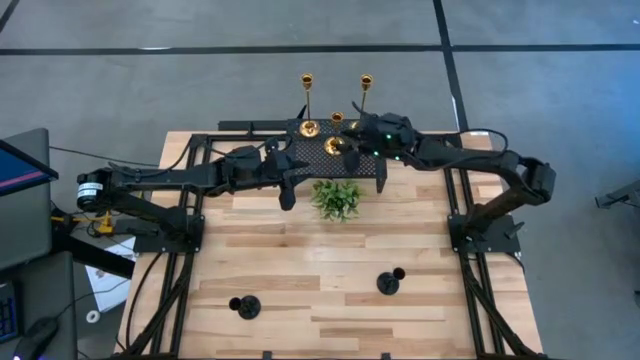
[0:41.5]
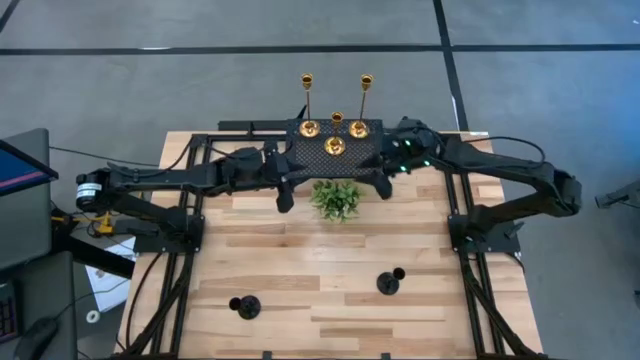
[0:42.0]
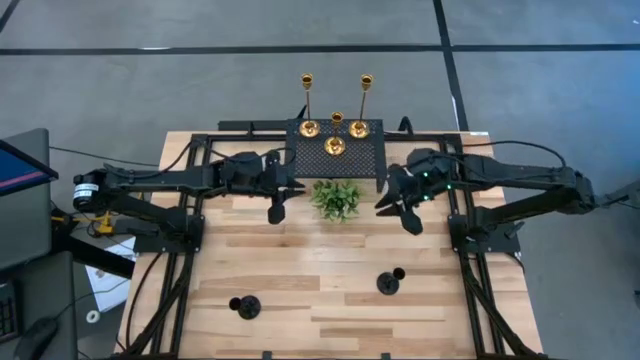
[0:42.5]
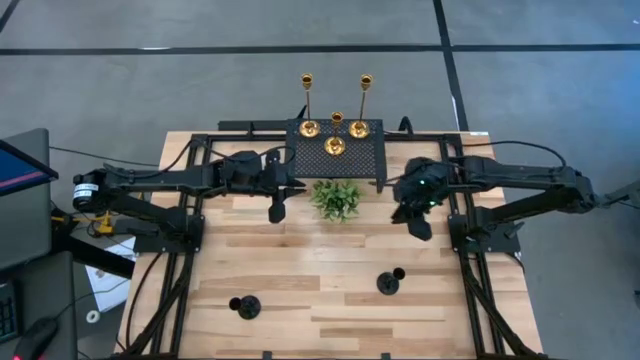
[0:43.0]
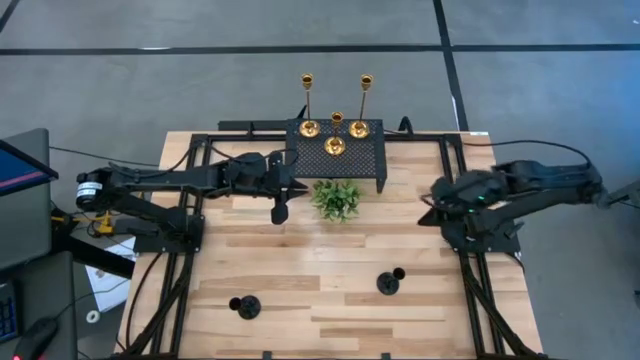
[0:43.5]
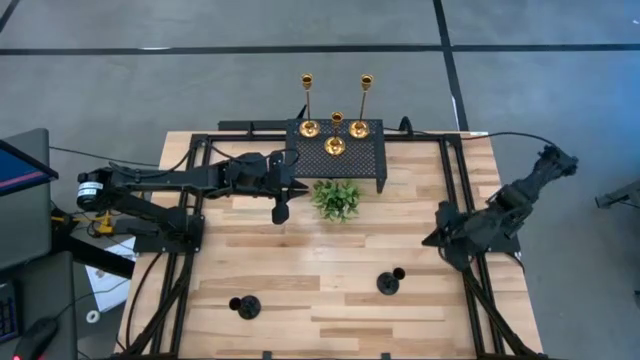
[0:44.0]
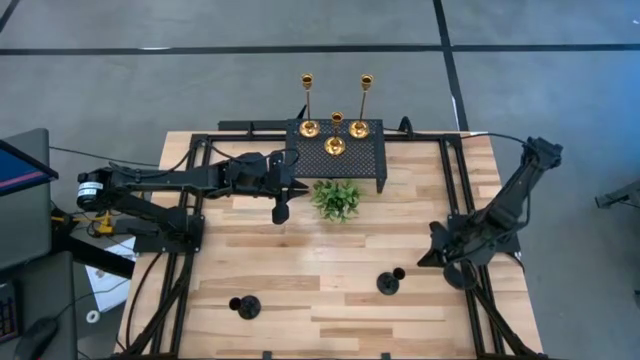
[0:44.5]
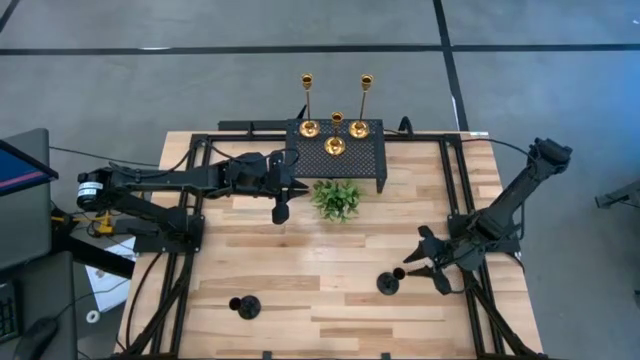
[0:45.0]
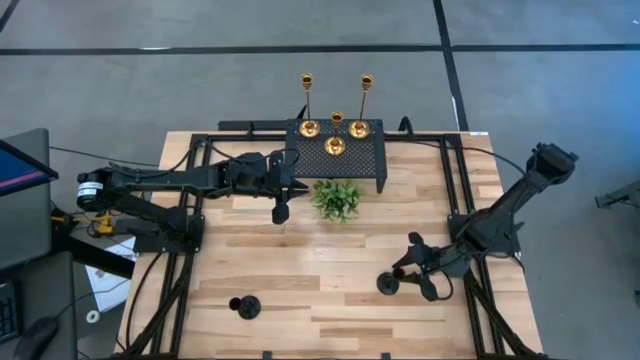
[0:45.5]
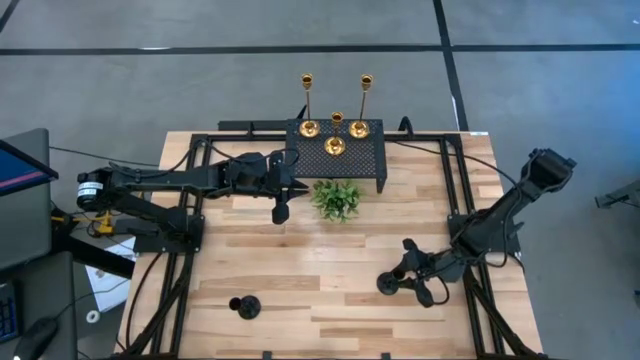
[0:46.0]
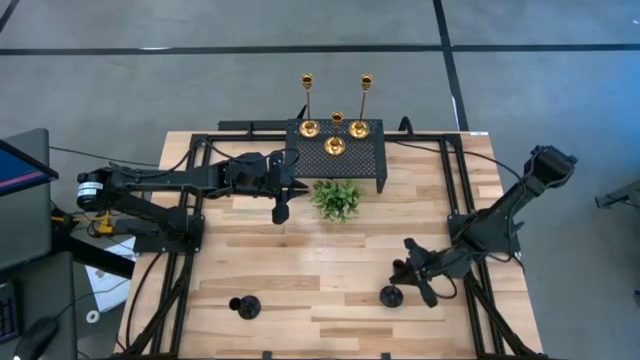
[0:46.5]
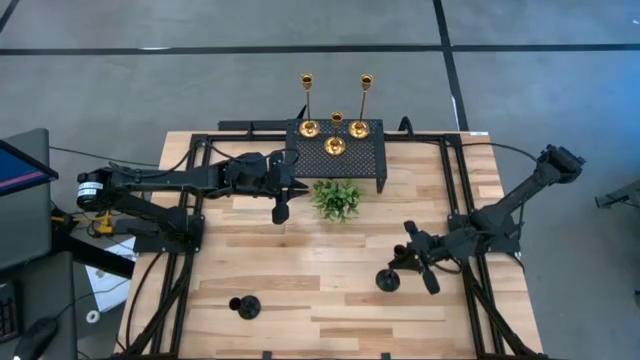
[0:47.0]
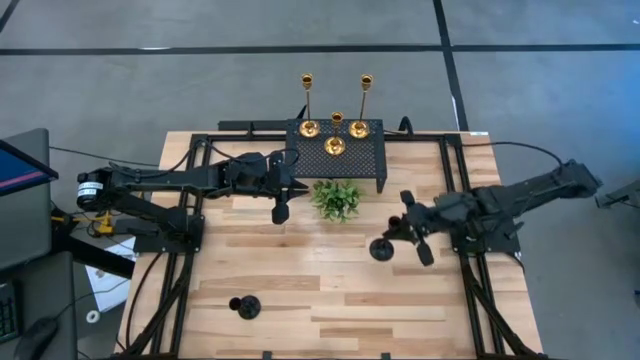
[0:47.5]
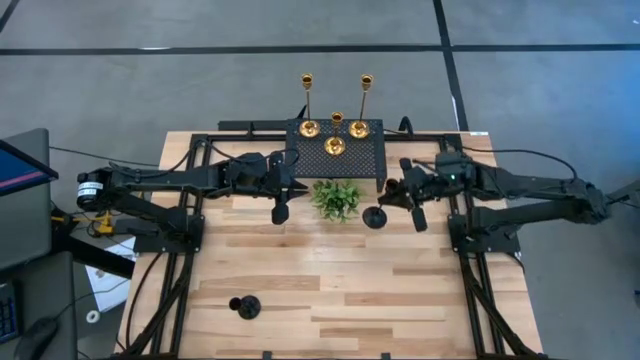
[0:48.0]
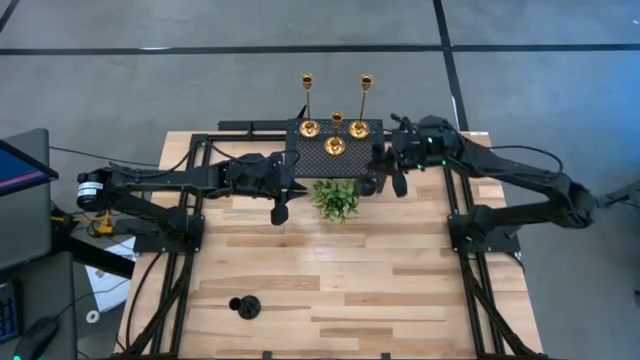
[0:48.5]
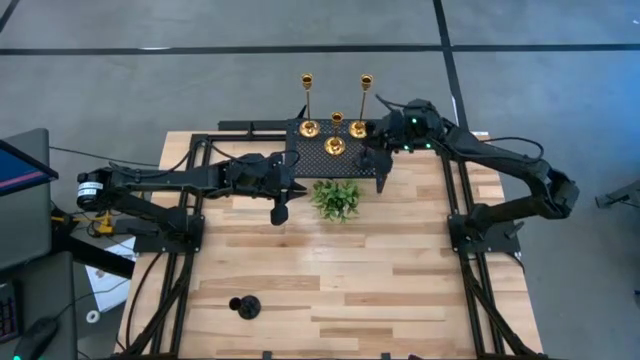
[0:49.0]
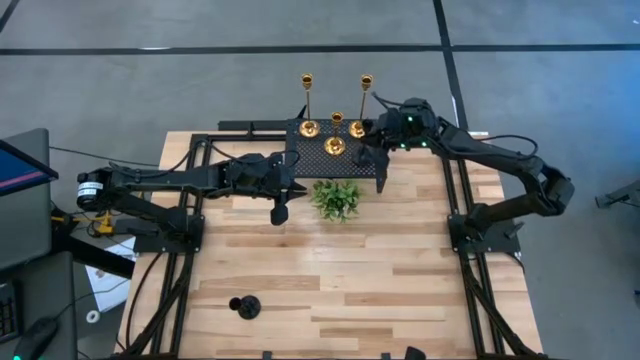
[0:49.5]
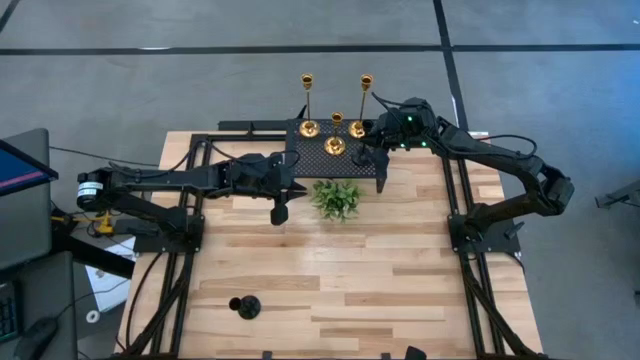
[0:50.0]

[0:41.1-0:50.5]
Task: Pick & Place candle stick holders
Put the right black candle holder on the shelf

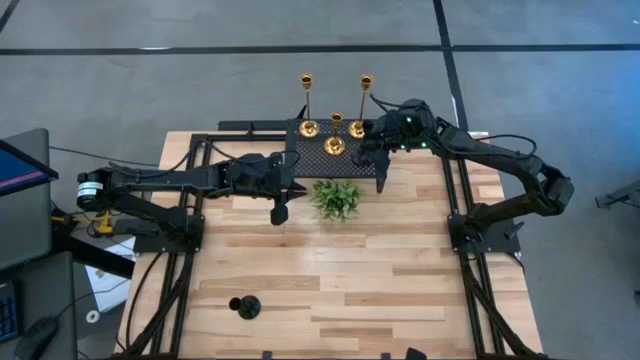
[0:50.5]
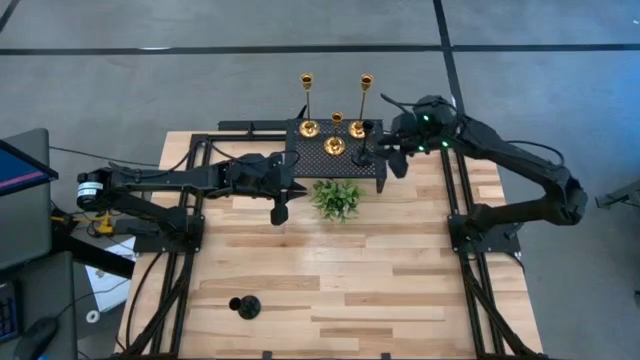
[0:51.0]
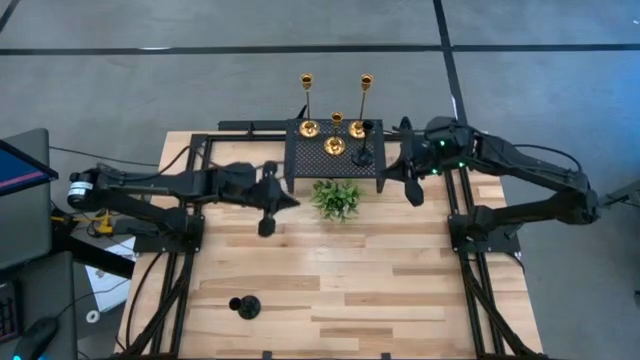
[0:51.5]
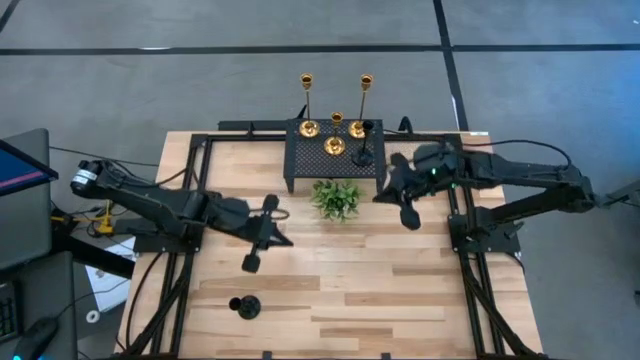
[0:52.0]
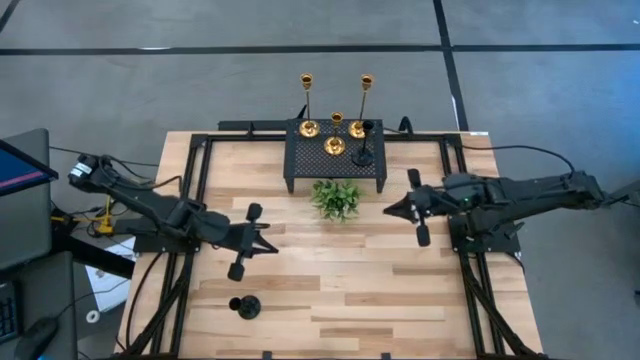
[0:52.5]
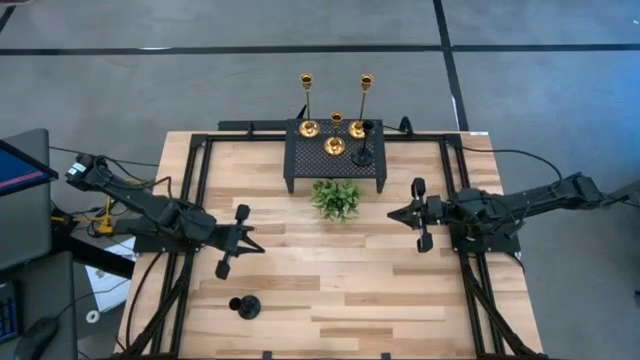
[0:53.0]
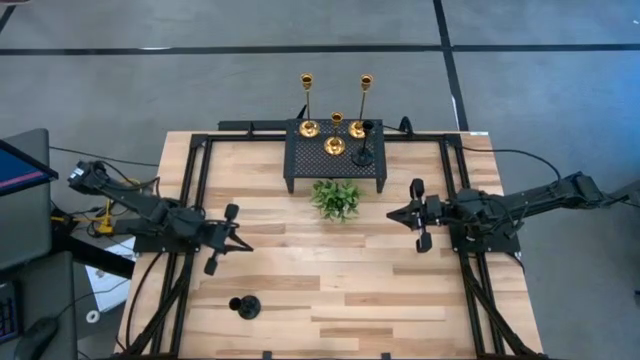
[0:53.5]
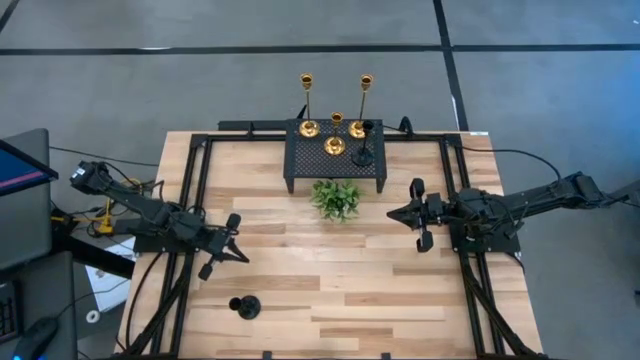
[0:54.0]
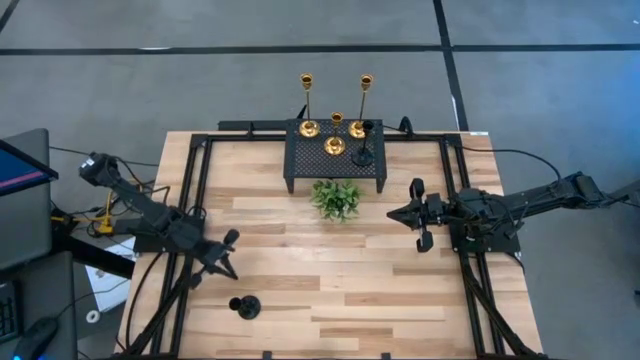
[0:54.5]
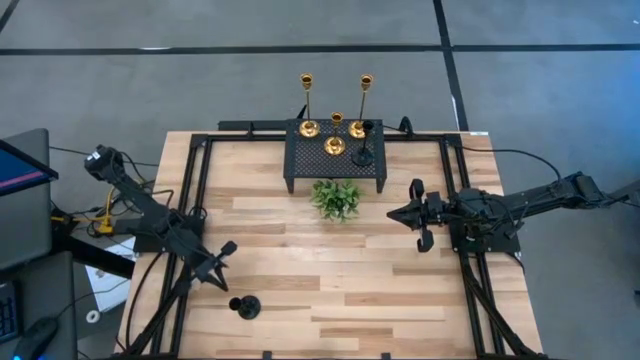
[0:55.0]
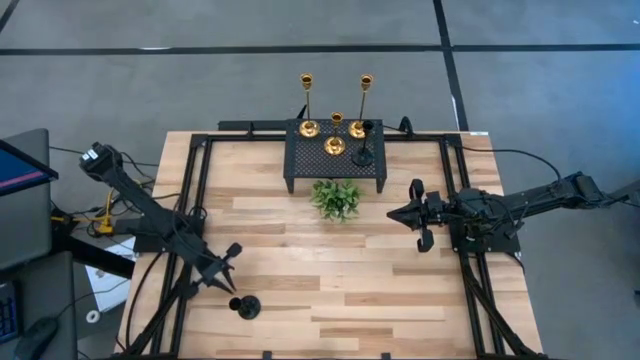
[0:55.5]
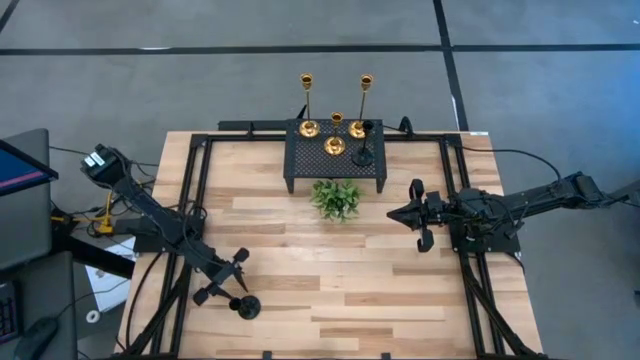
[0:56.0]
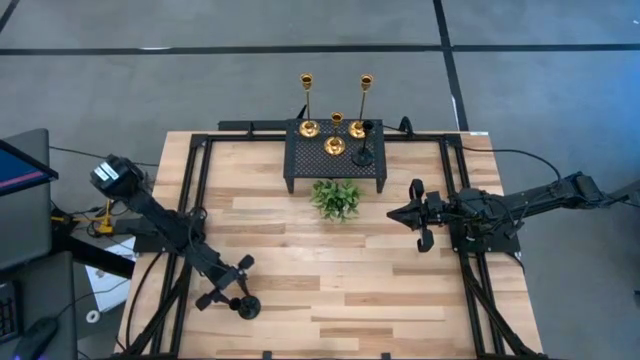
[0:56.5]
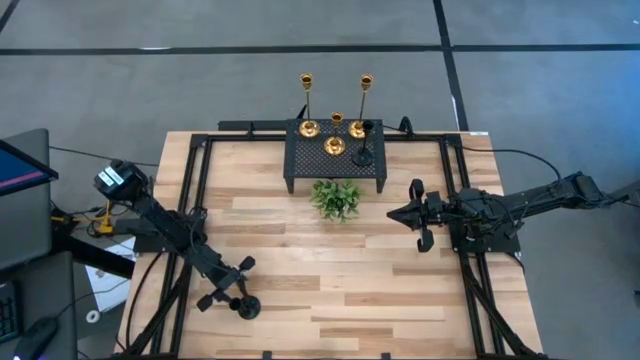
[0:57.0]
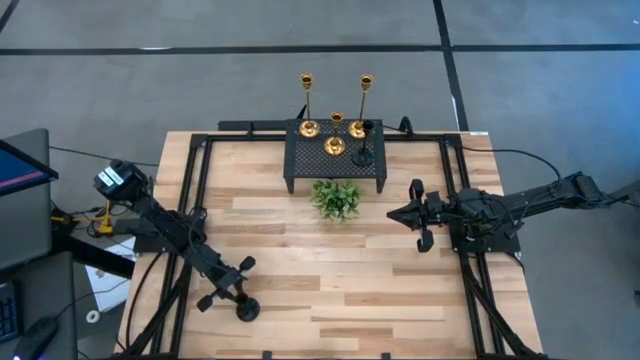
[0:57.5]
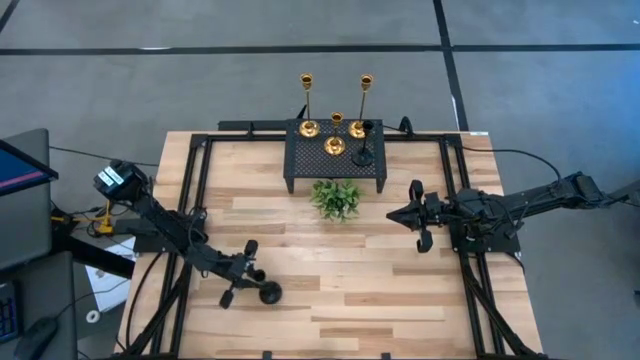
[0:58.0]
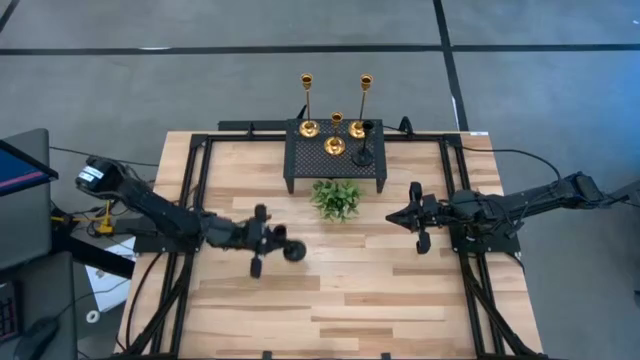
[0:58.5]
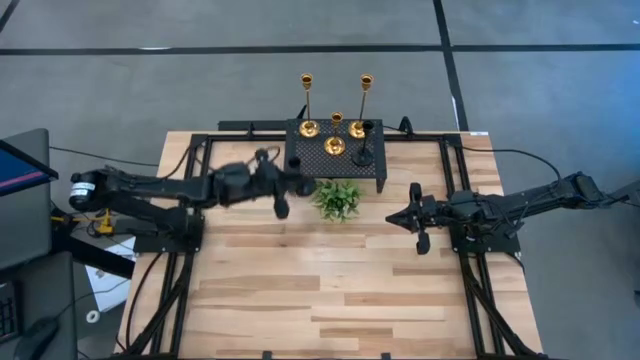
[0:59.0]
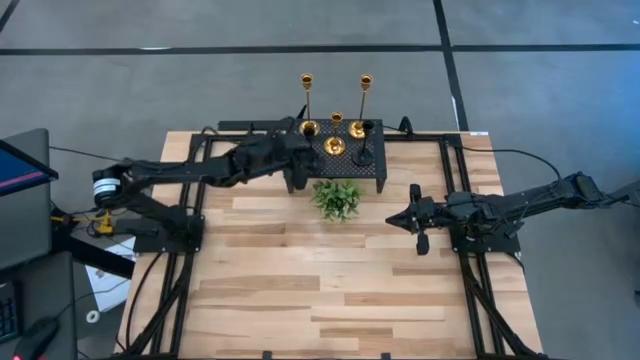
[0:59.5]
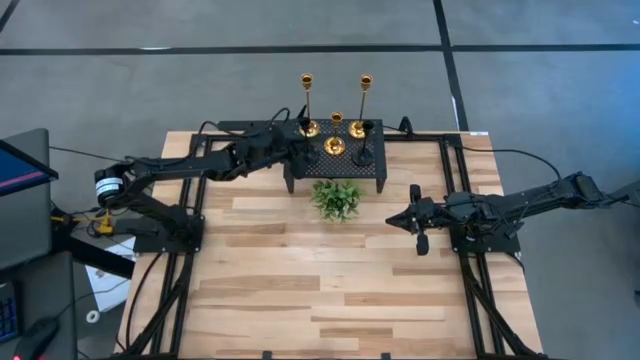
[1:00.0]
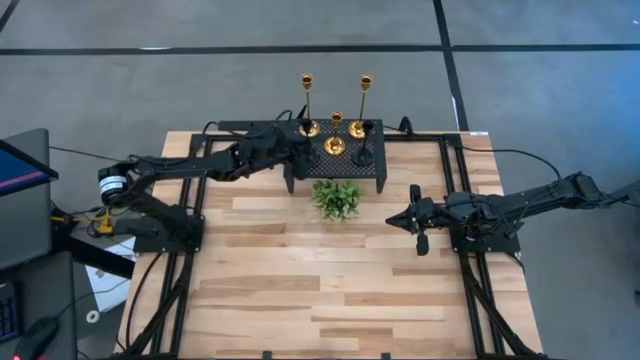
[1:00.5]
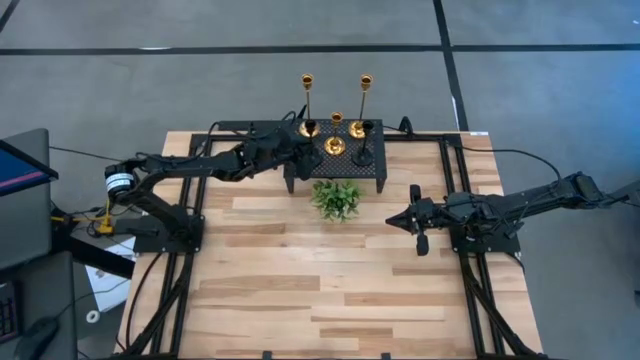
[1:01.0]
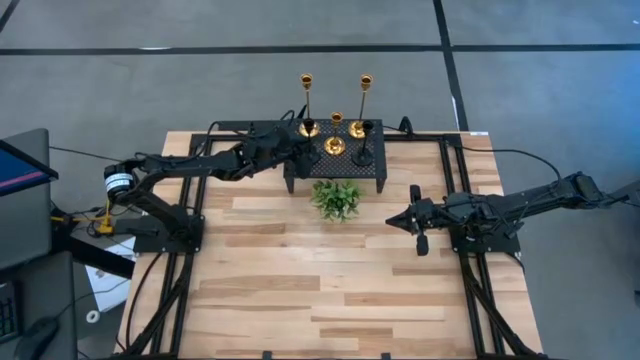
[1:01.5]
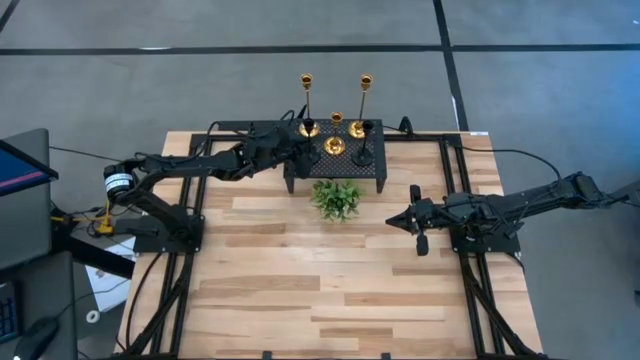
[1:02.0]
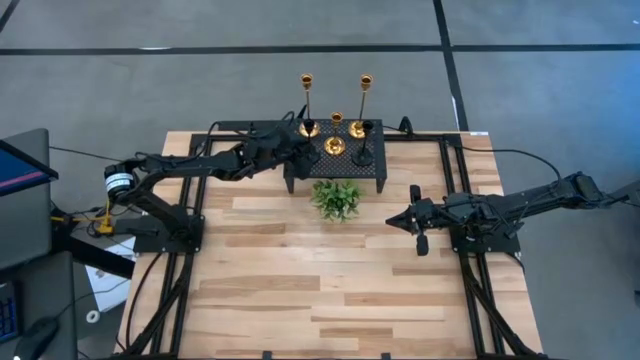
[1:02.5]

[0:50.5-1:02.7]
Put the black candle holder on the shelf
